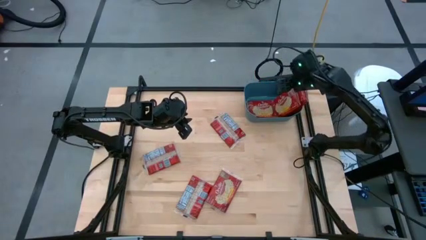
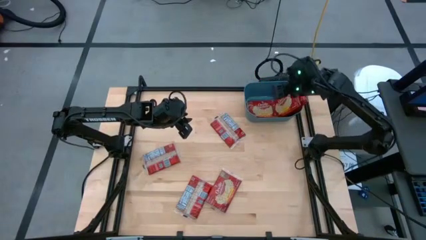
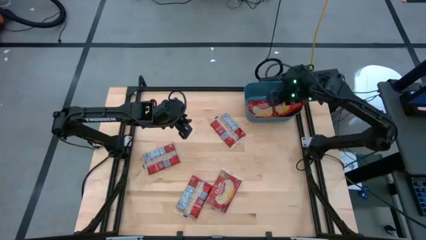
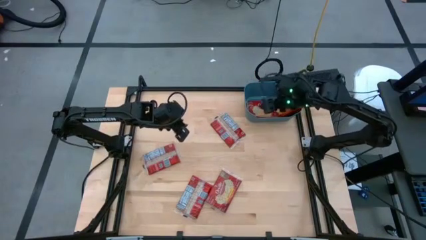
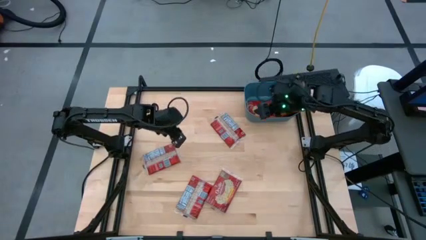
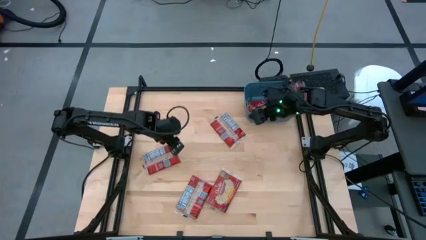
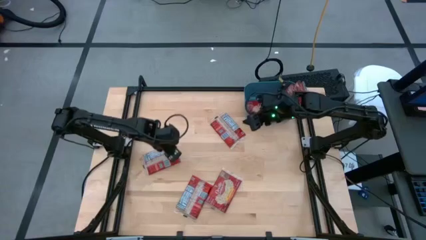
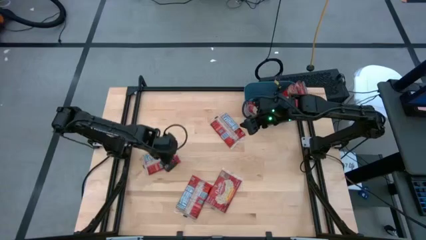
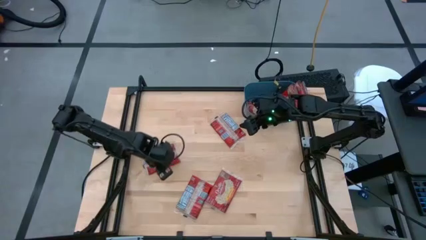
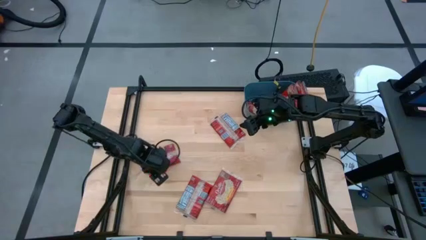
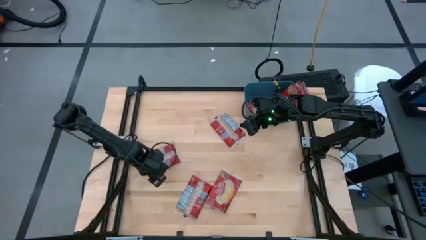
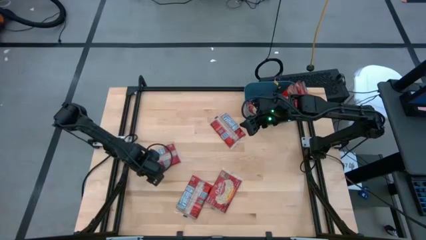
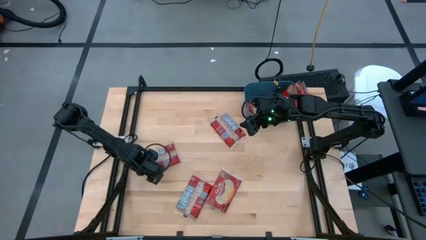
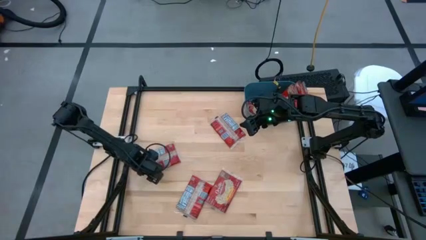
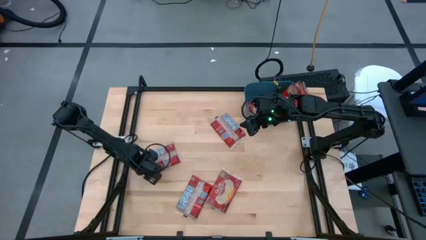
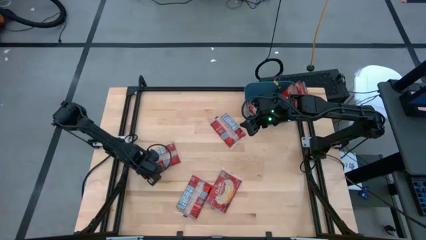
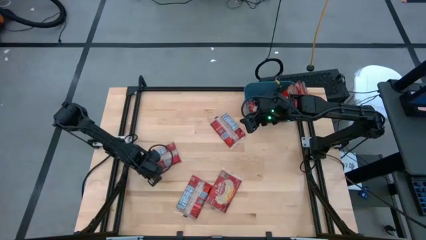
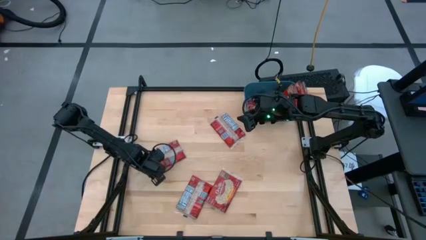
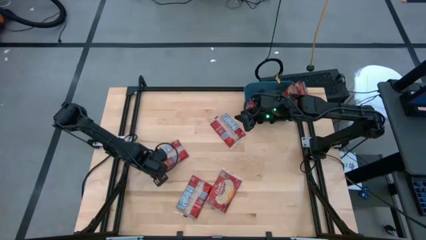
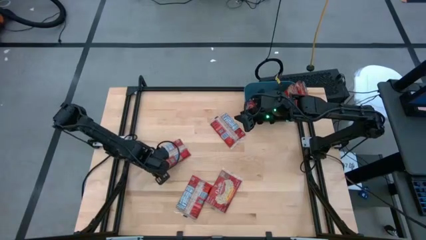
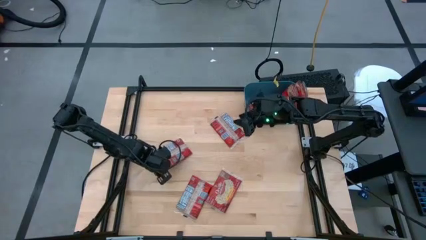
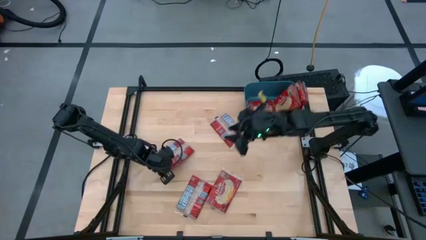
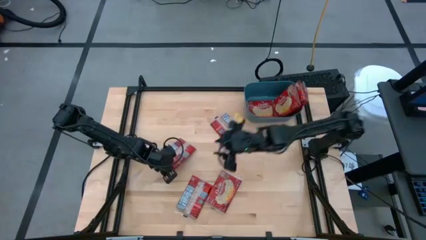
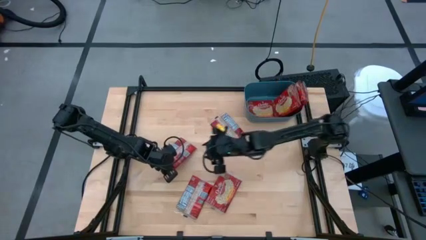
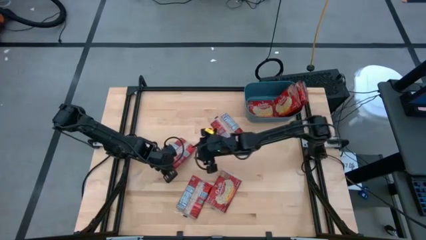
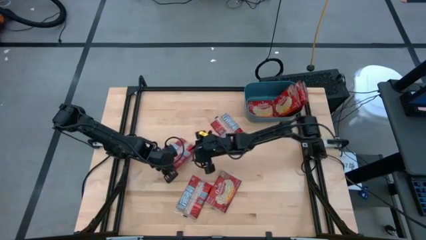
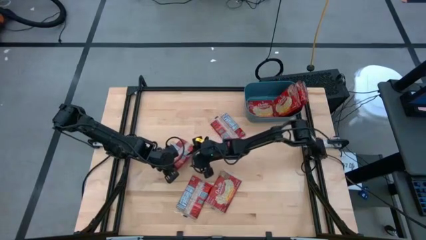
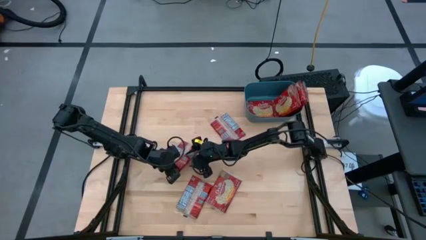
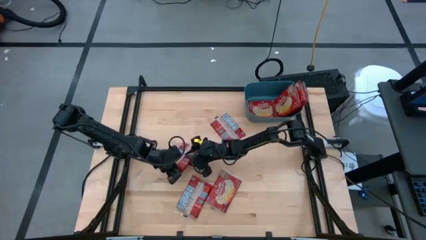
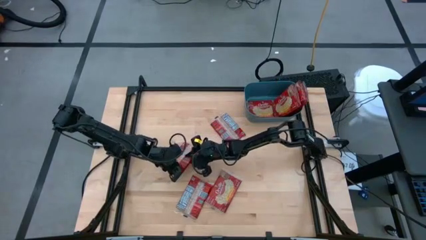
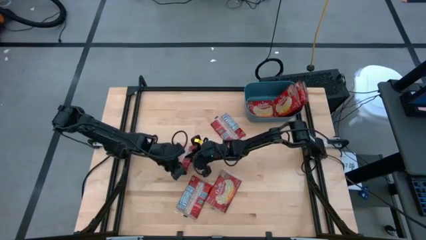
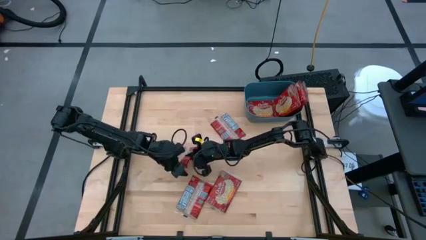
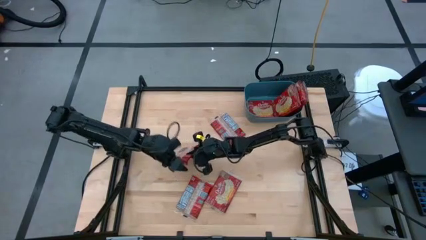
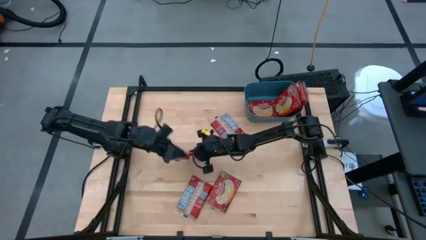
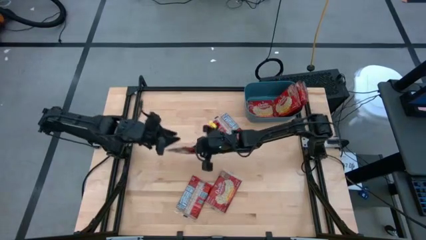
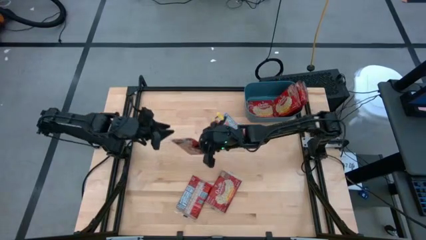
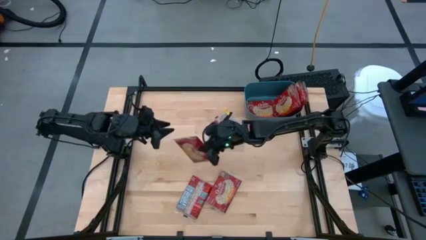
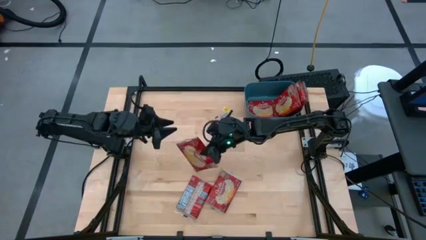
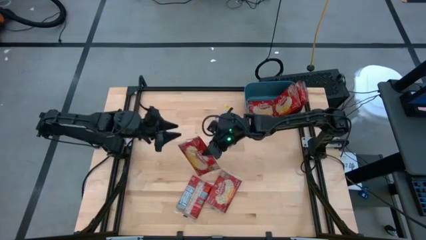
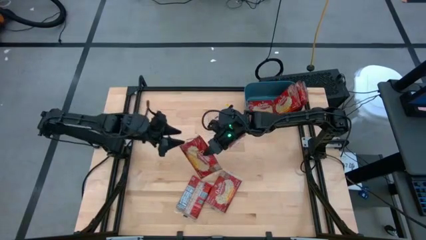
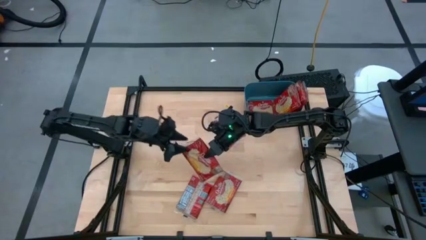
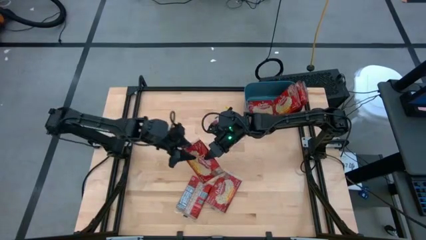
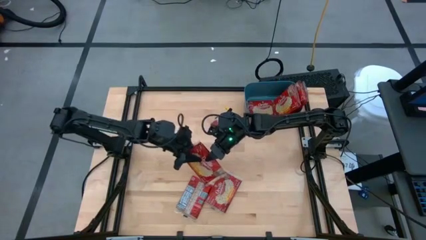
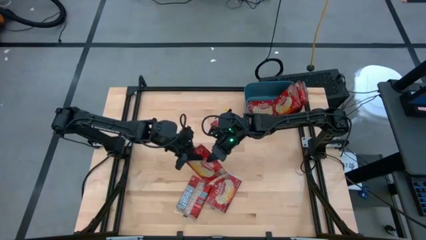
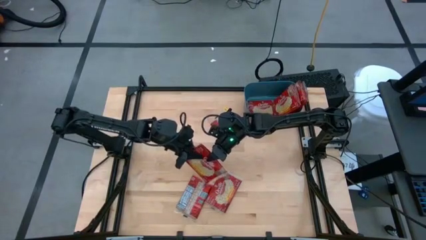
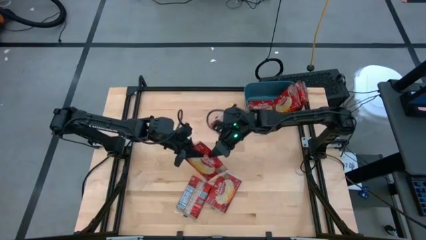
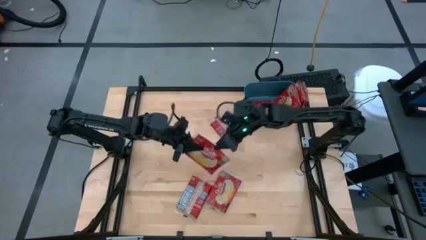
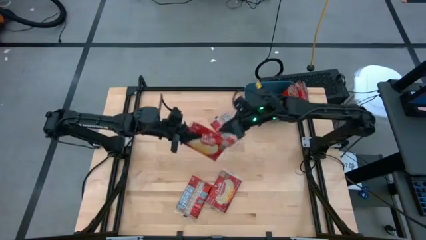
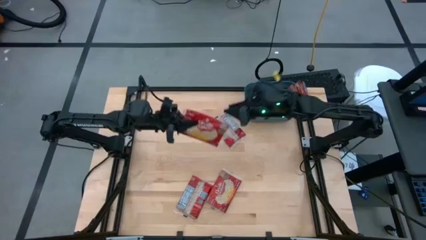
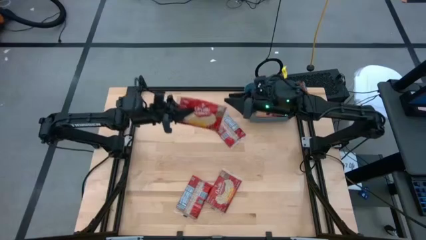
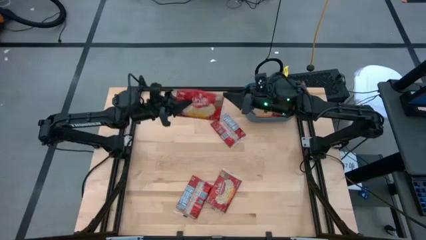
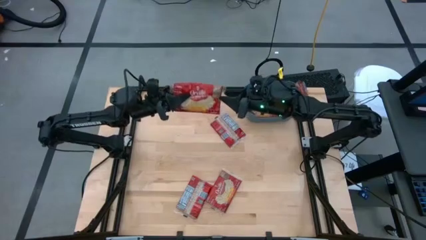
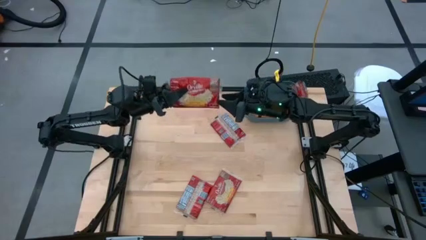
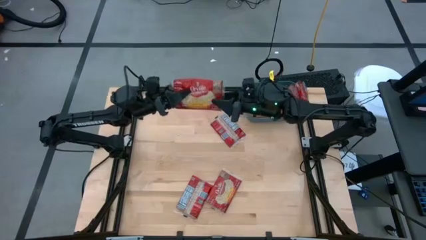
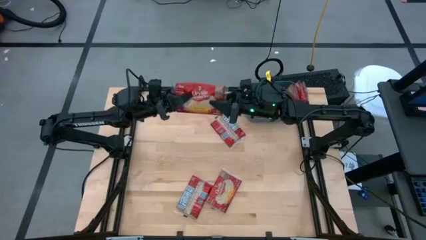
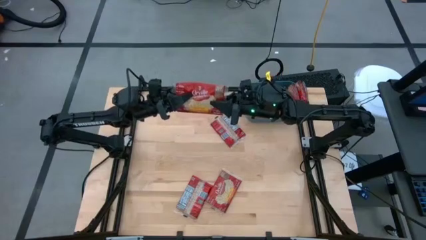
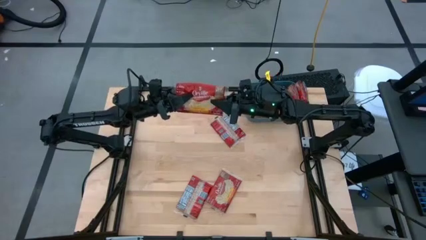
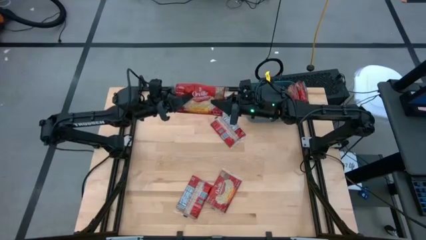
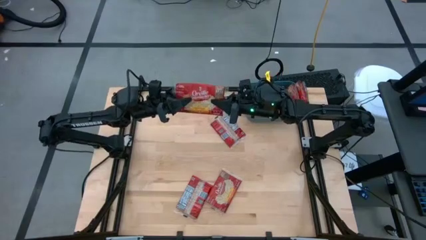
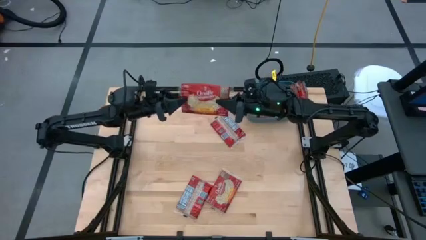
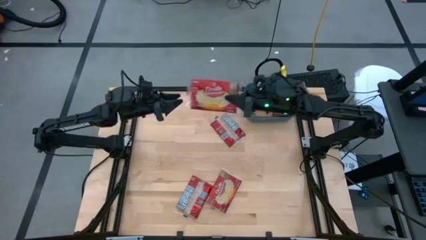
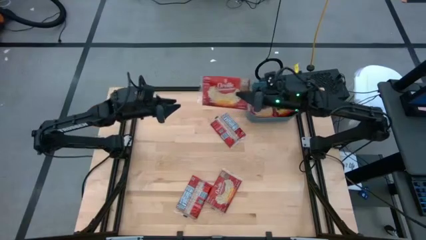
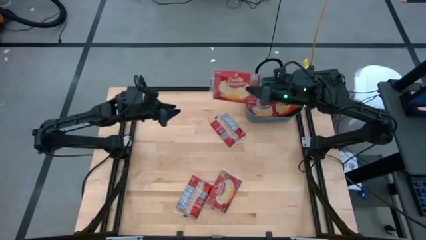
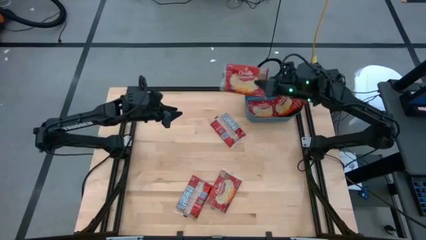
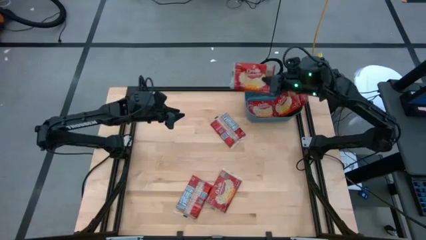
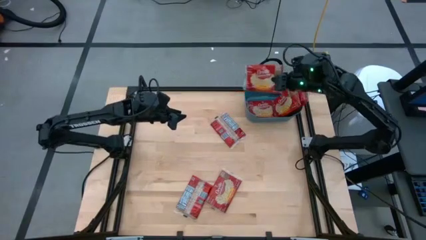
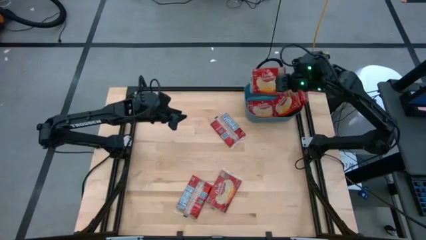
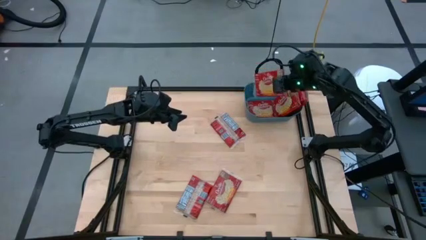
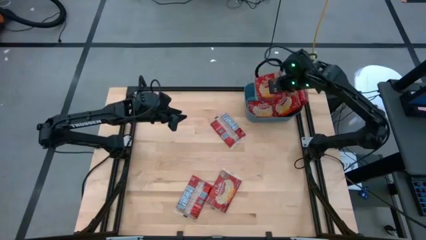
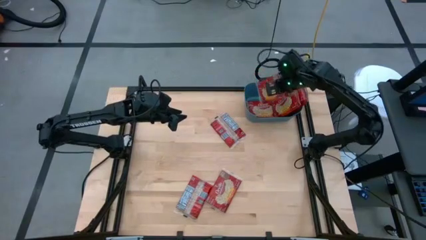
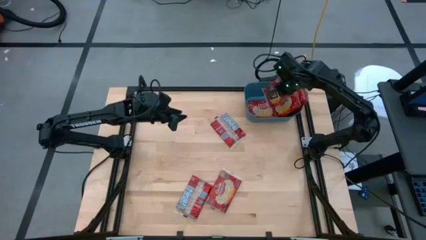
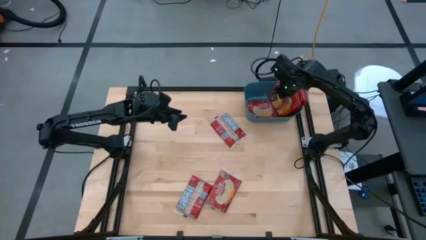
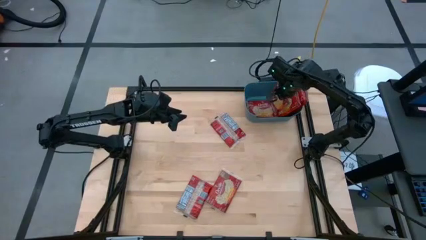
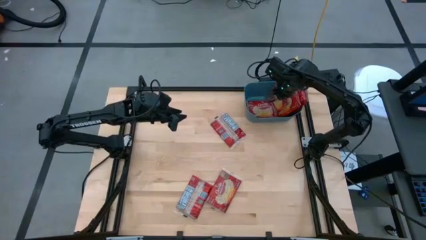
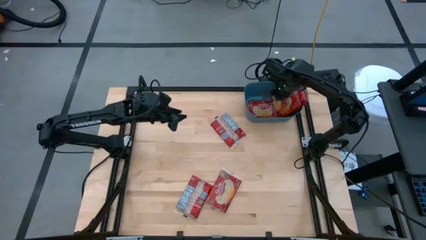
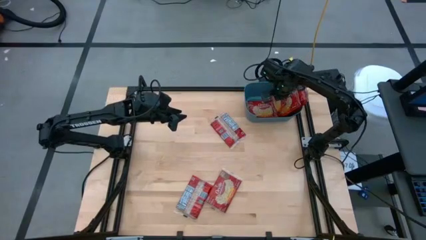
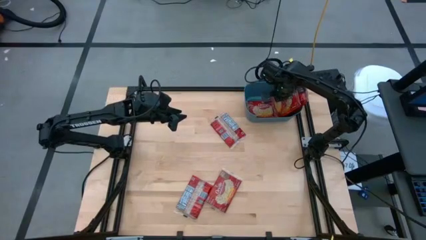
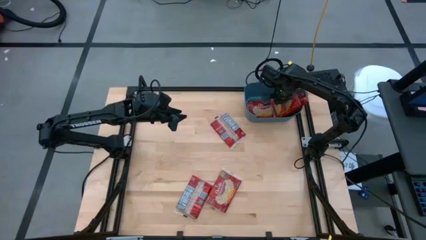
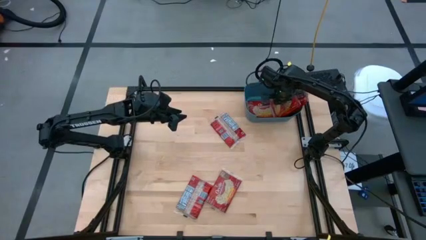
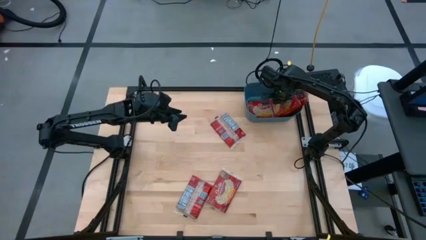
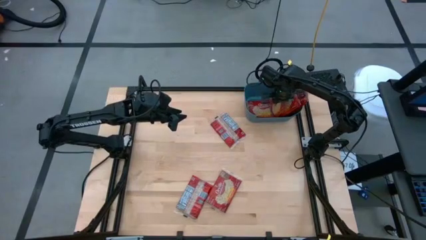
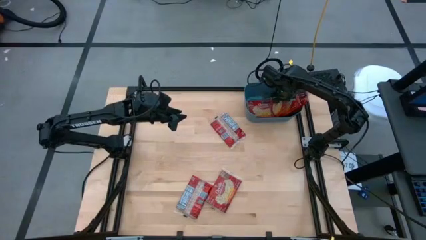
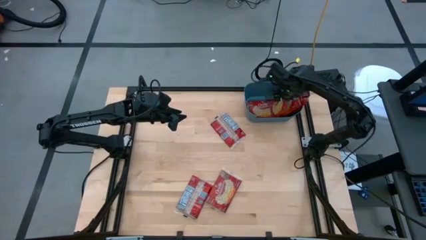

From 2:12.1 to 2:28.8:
Task: Sort popcorn bags into baskets
Put the popcorn bag into the blue bin
